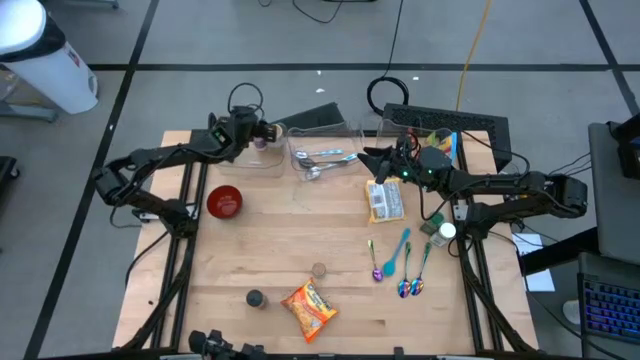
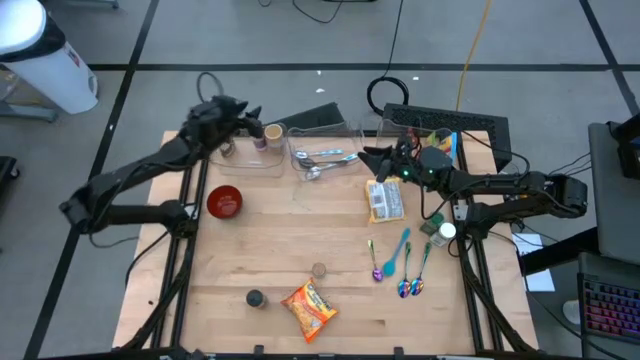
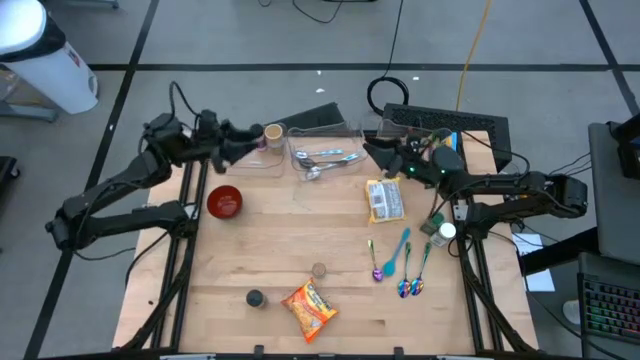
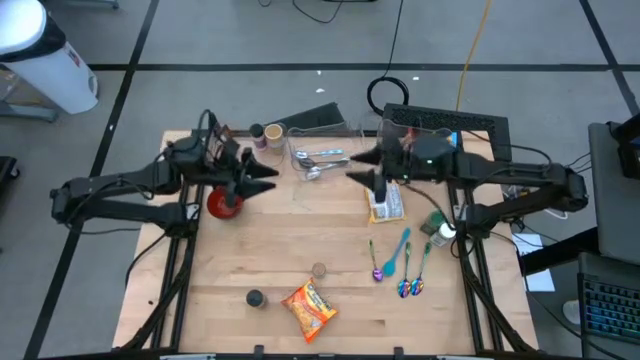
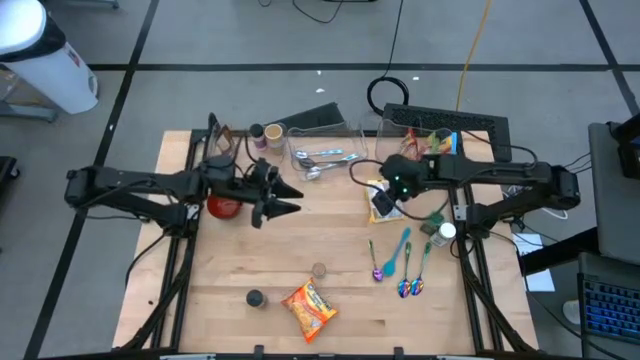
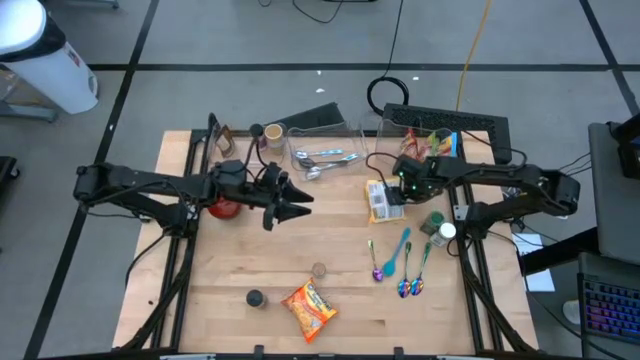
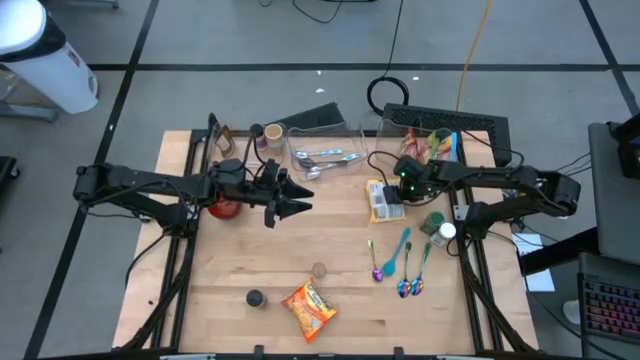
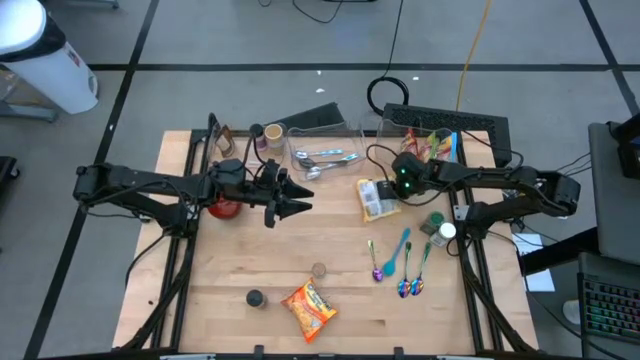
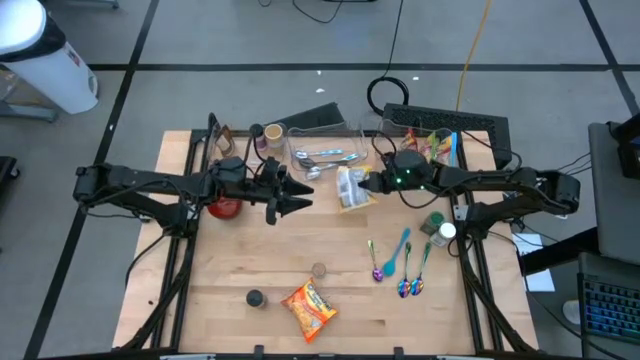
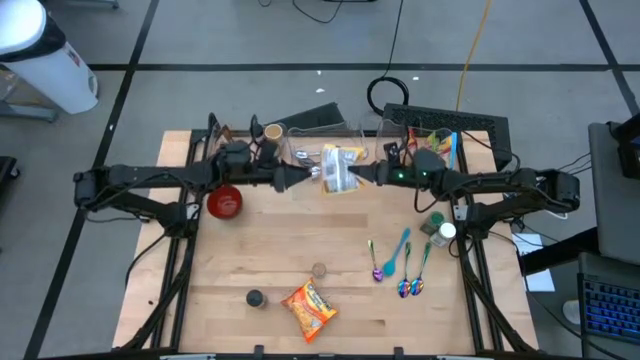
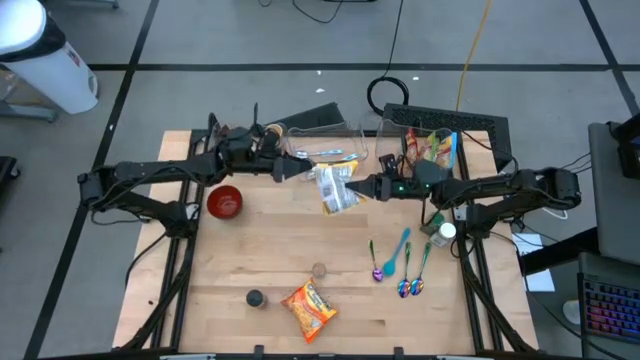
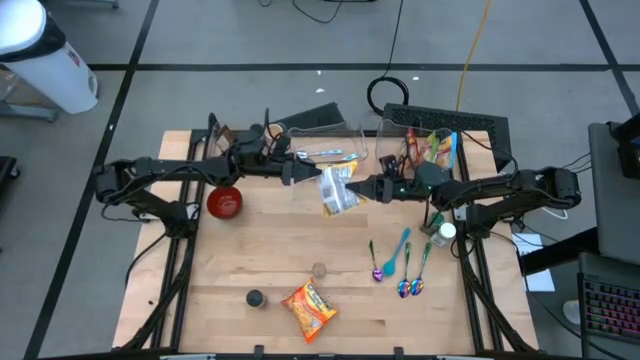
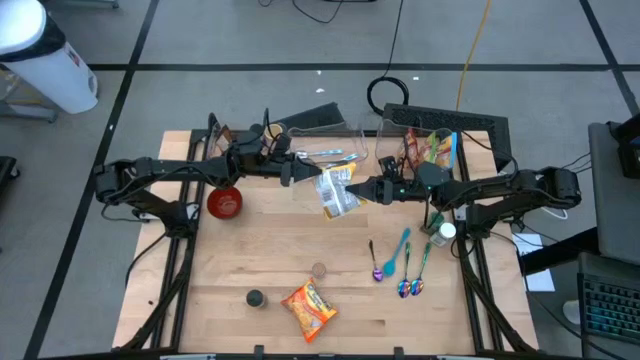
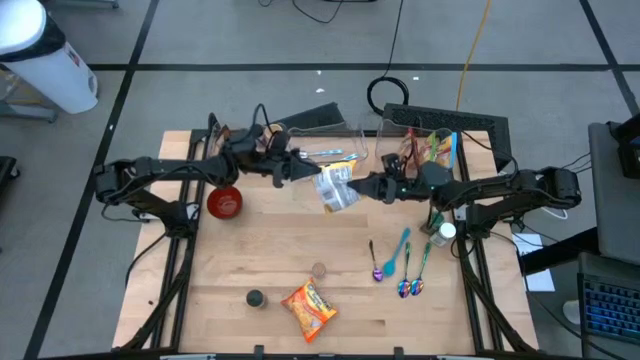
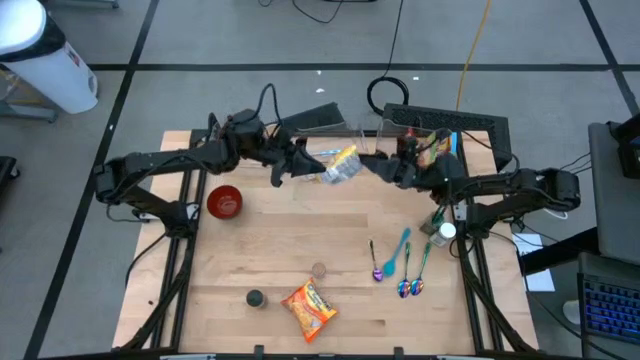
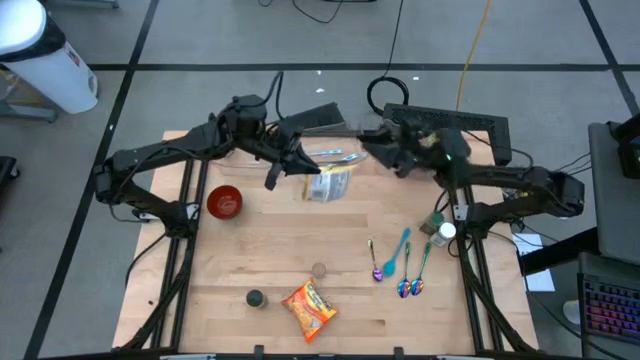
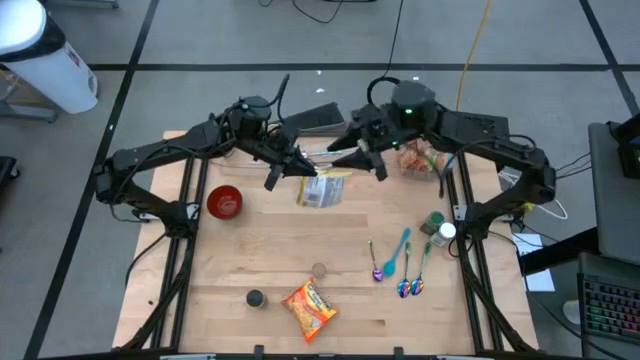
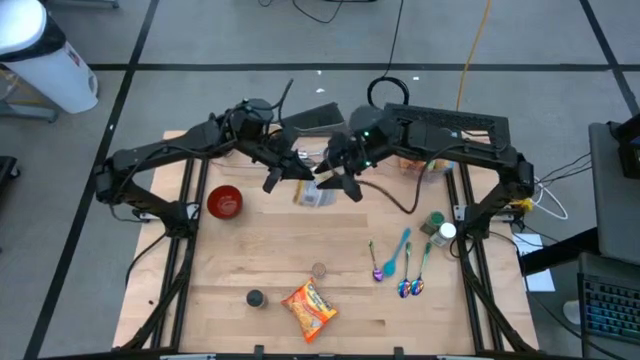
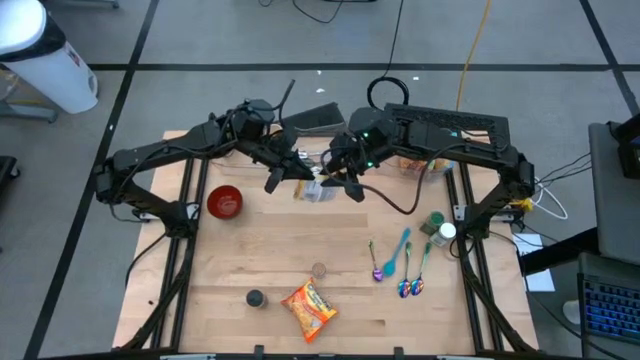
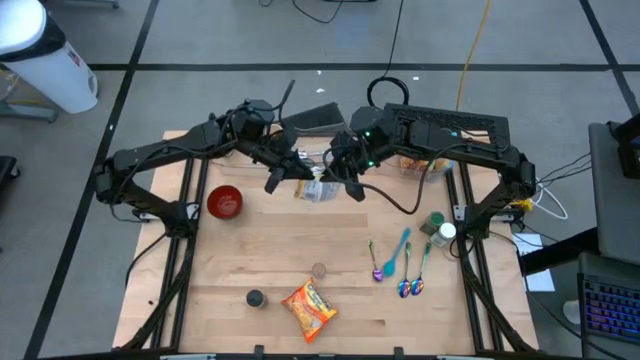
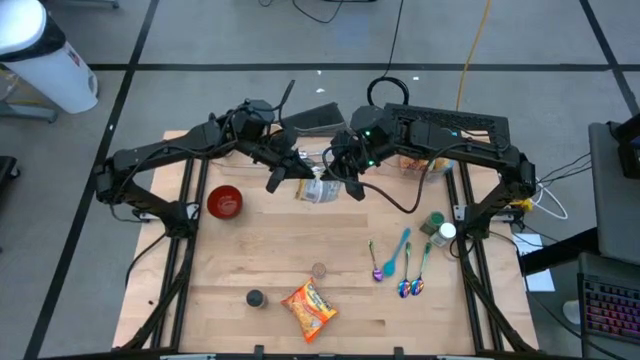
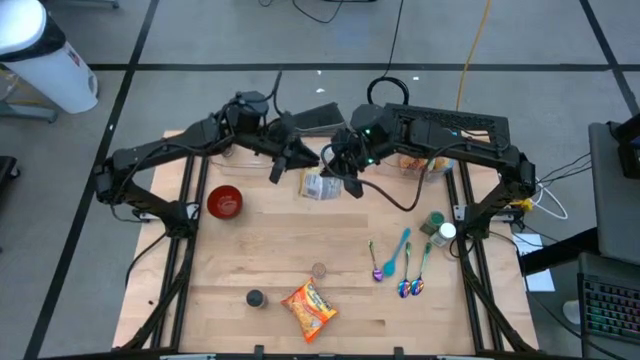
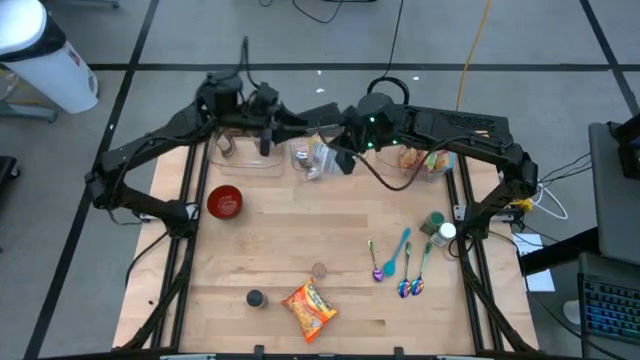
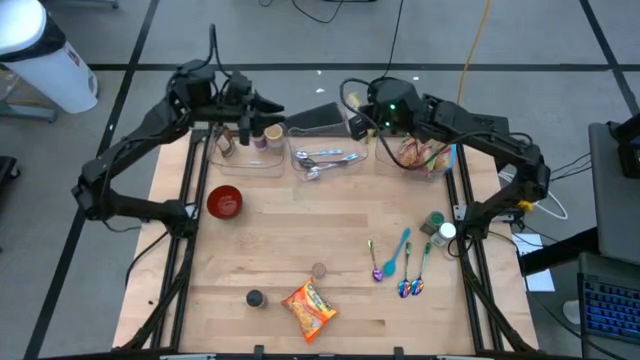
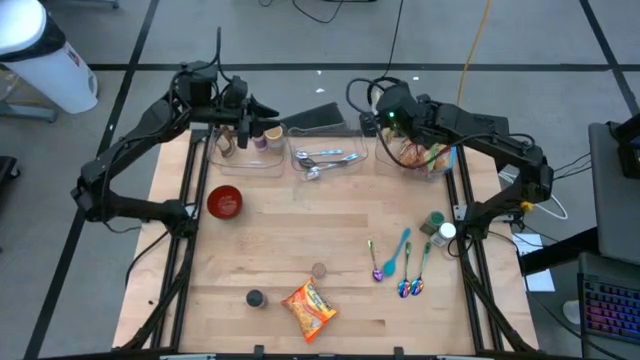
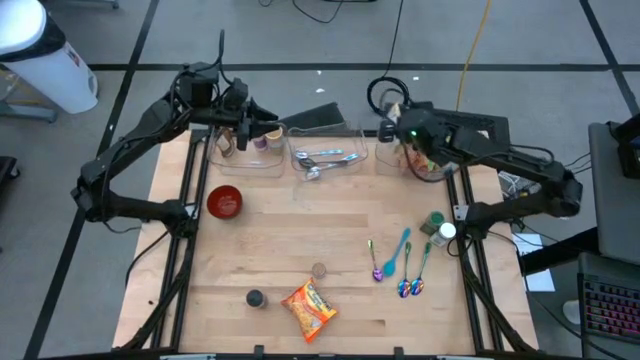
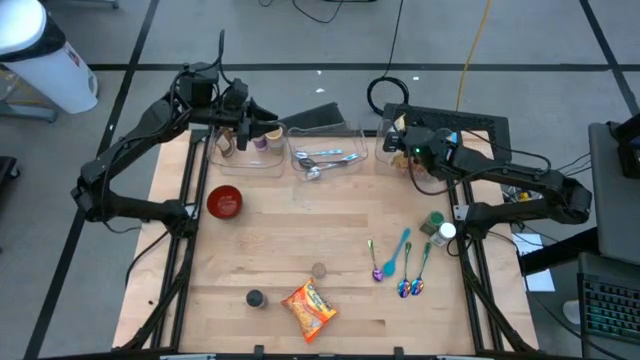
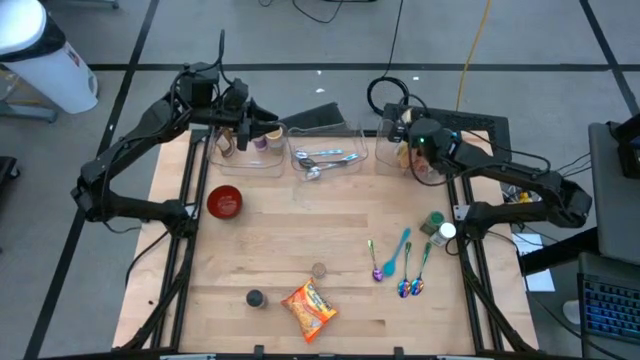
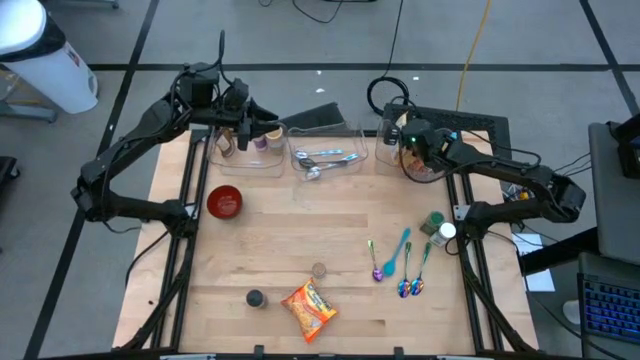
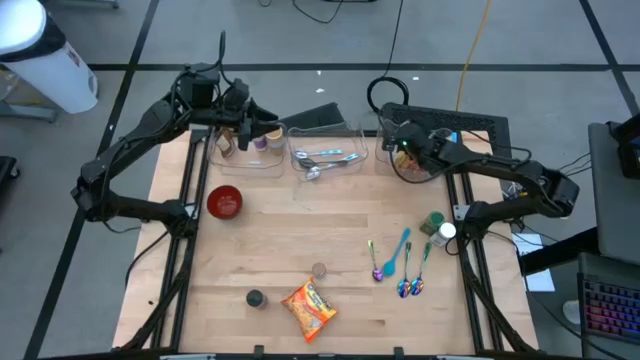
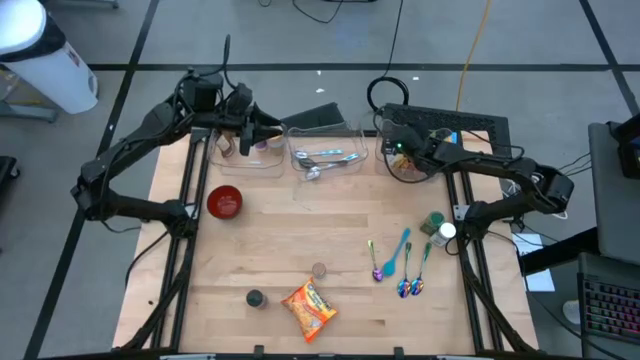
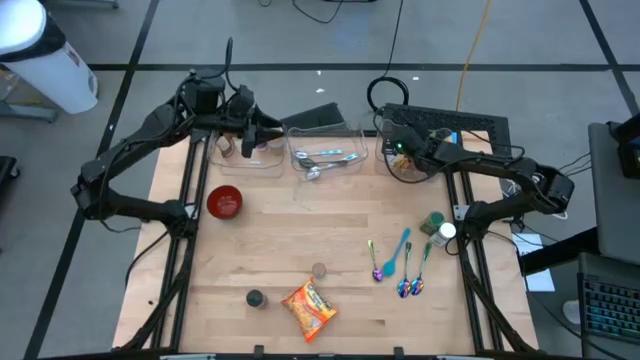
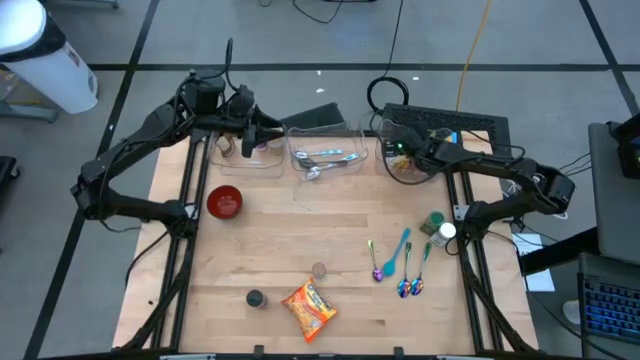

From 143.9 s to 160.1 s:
Task: Pick & Place Food Item
Put the yellow noodle pack into the right transparent bin

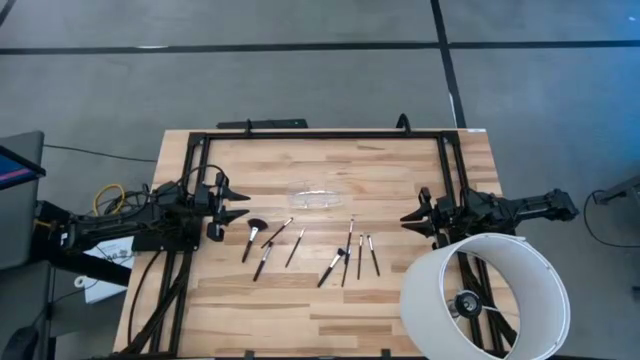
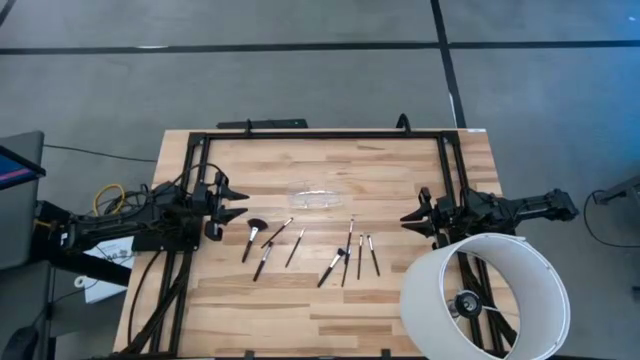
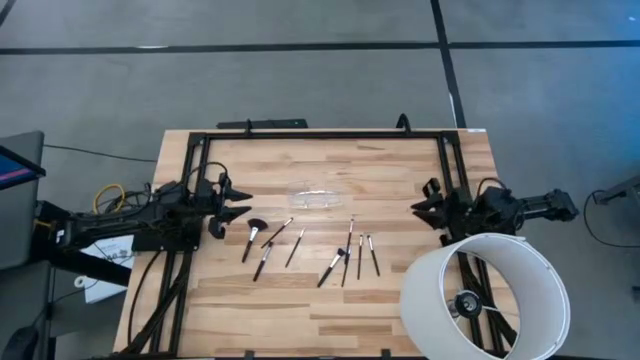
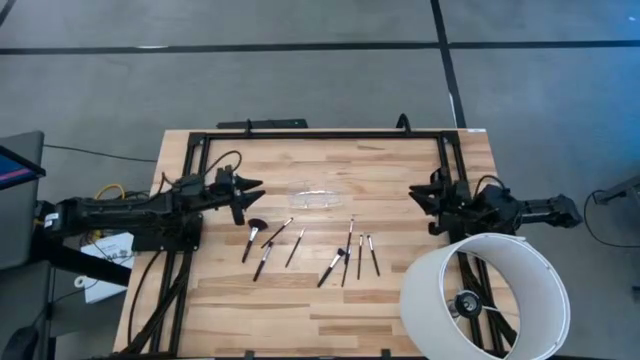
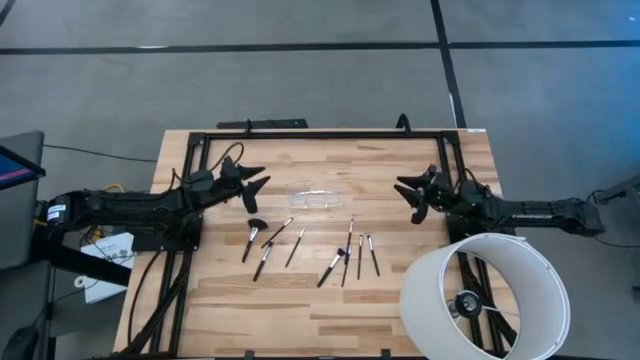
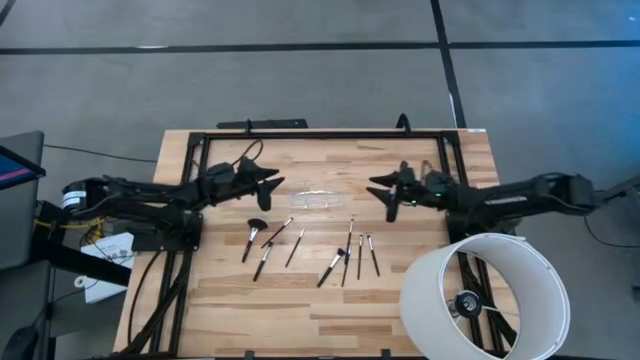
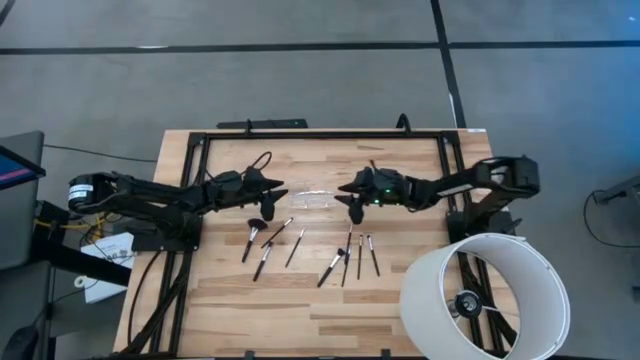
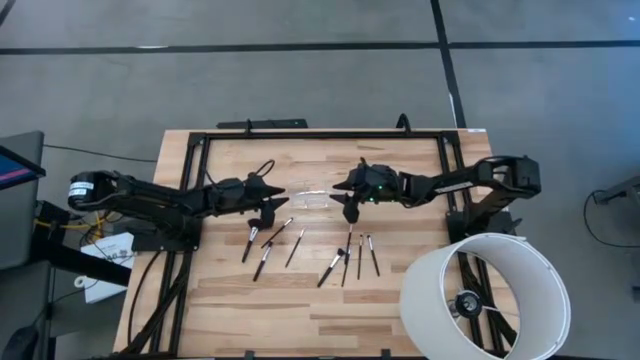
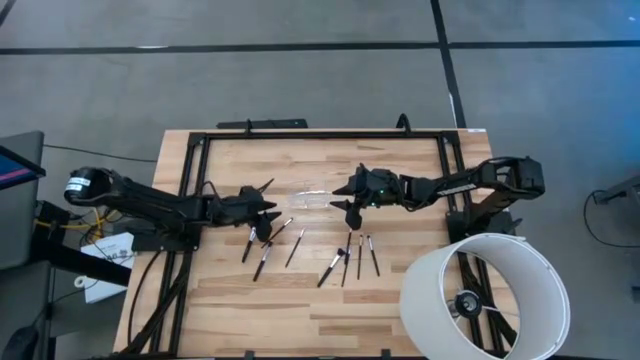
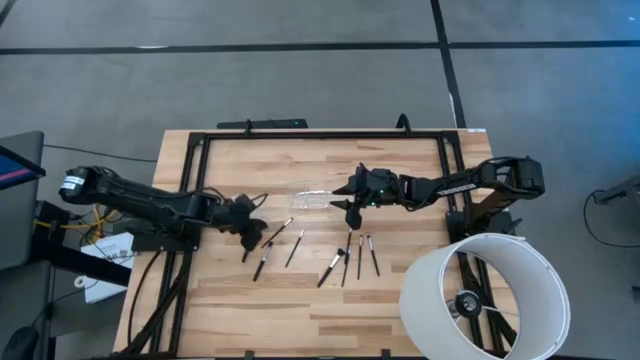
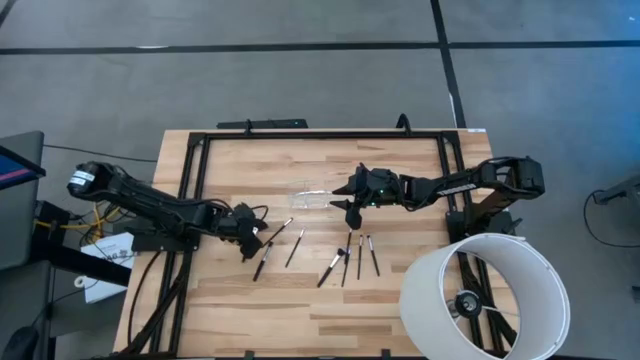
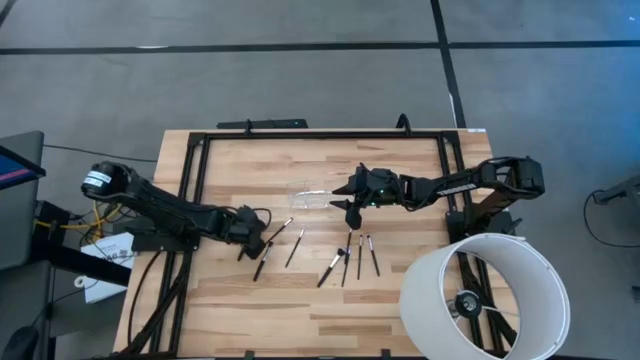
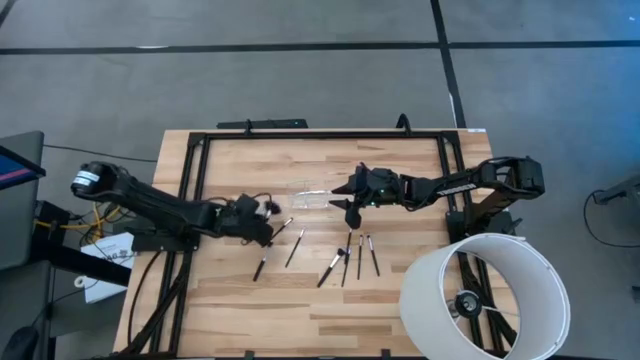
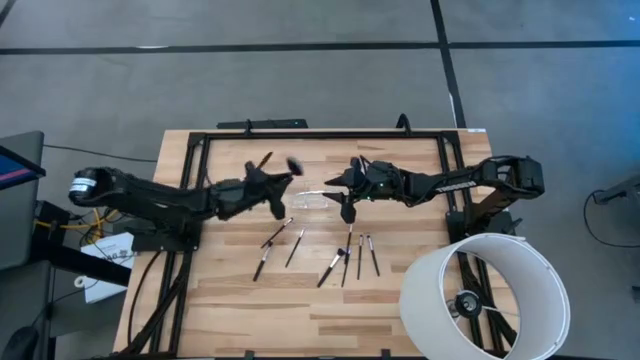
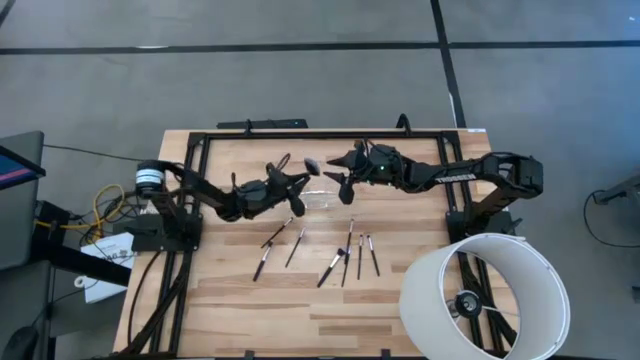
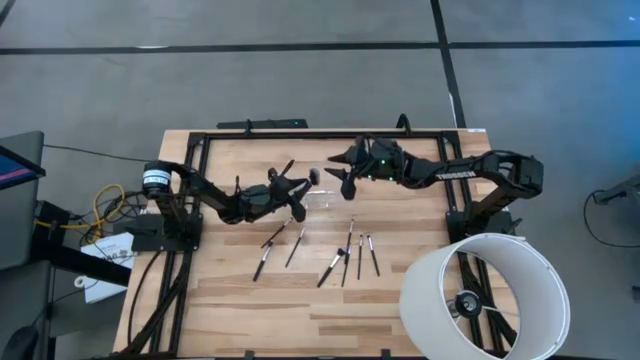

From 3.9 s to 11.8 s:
Task: Put items in baskets/containers
Put the highlighter brush into the transparent organizer
